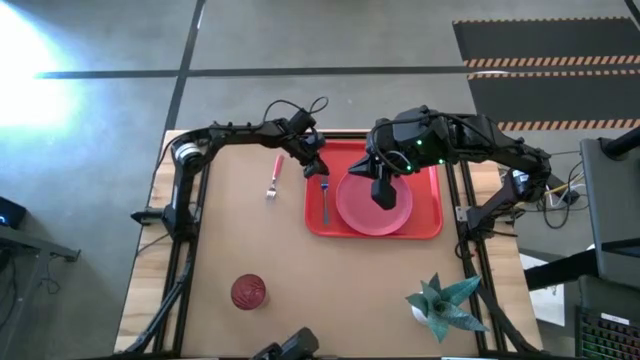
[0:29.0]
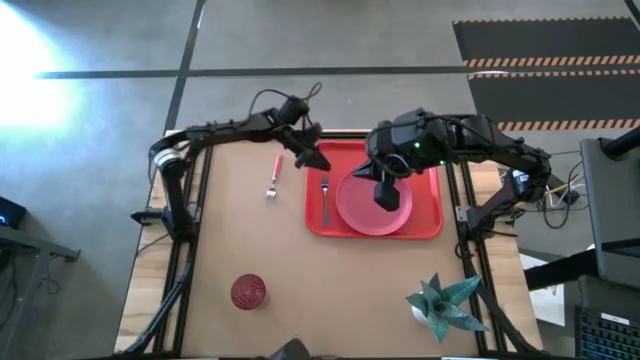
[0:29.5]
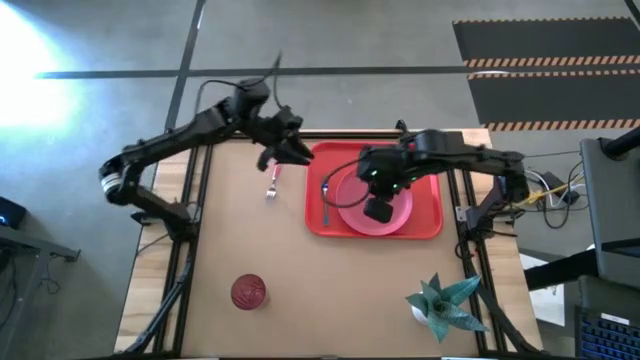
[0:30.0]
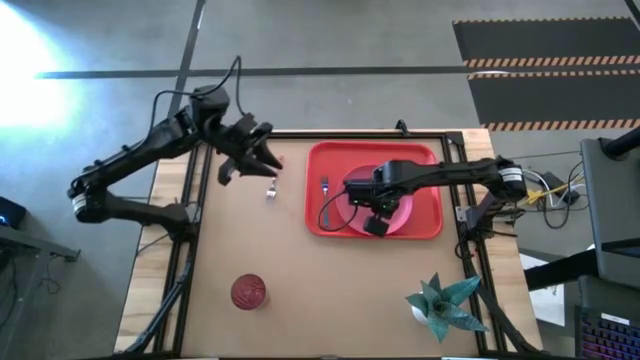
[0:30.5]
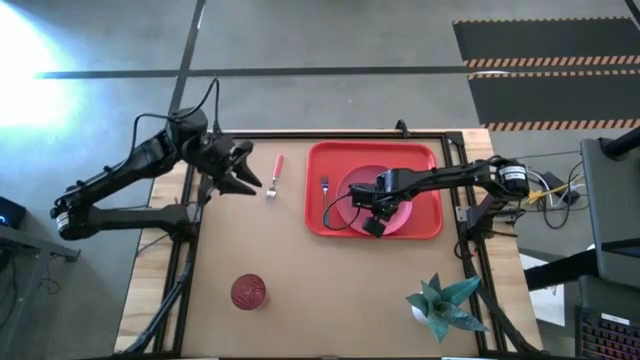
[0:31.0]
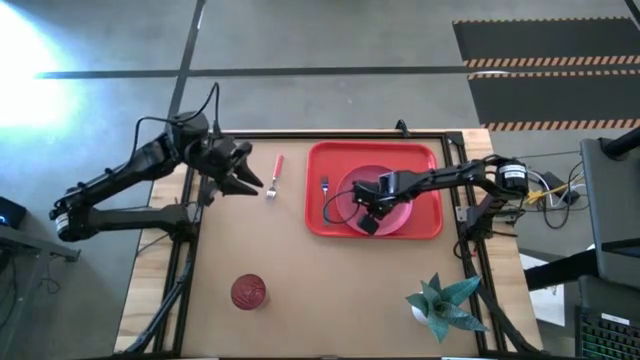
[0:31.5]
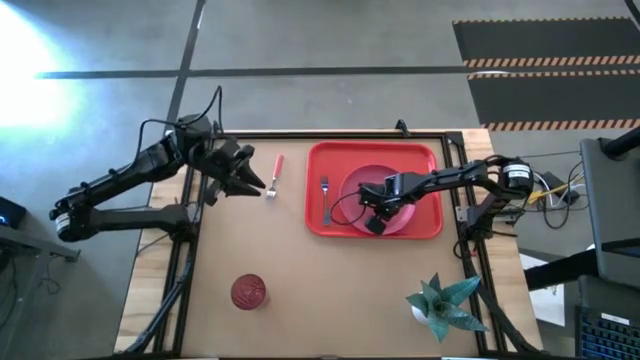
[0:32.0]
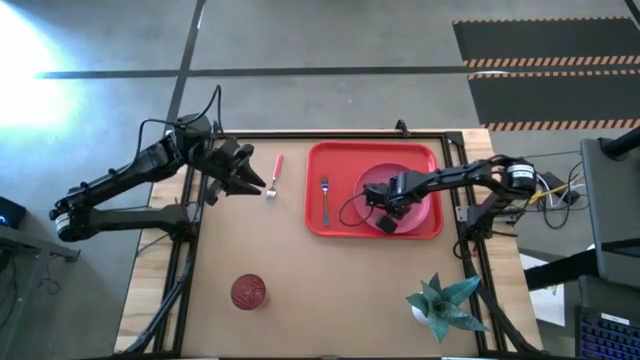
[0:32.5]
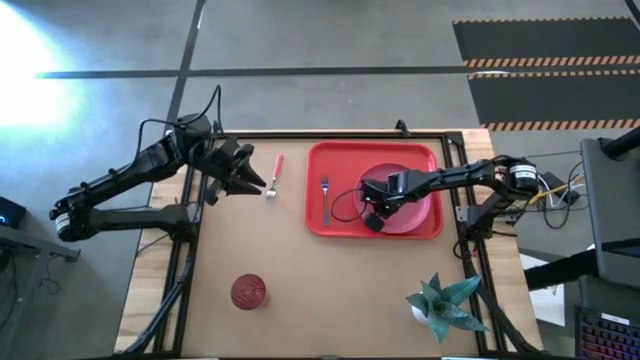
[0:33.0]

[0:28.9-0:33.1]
Task: Pick and place plate/cup/fork/spoon on tray
Adjust the pink plate on the red tray

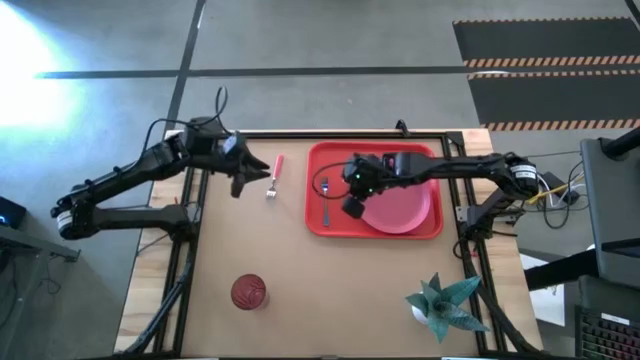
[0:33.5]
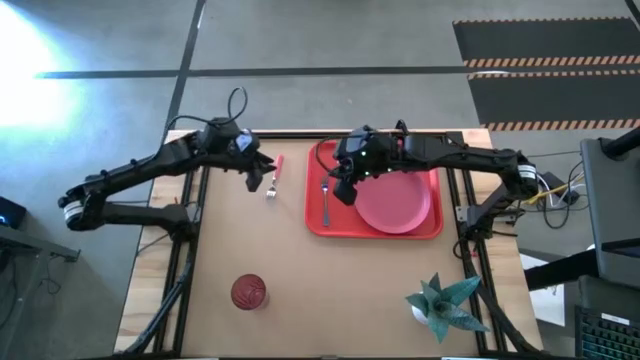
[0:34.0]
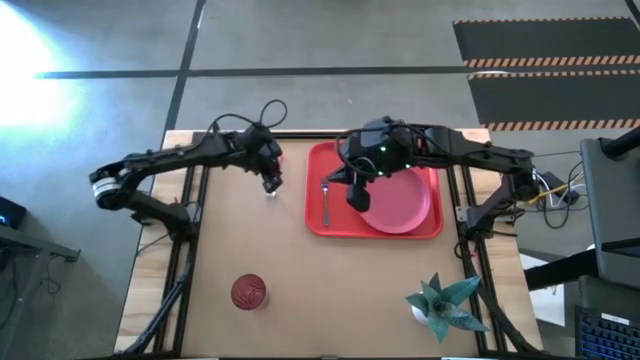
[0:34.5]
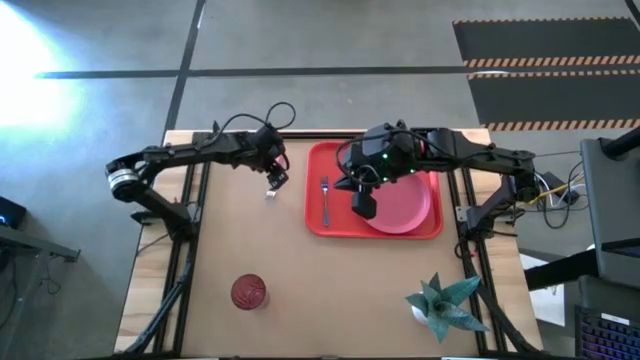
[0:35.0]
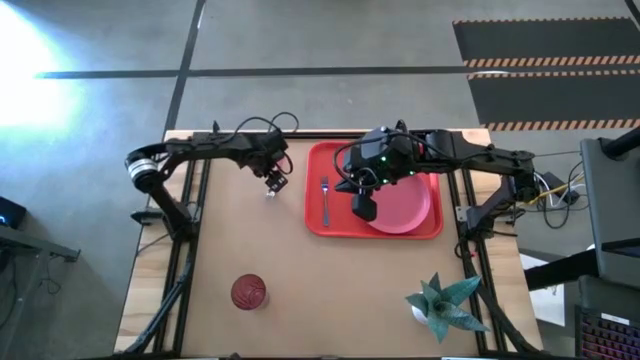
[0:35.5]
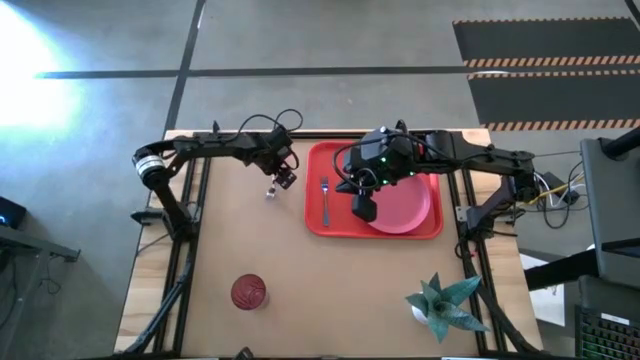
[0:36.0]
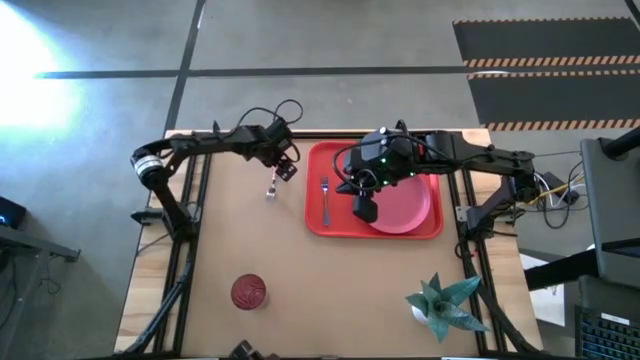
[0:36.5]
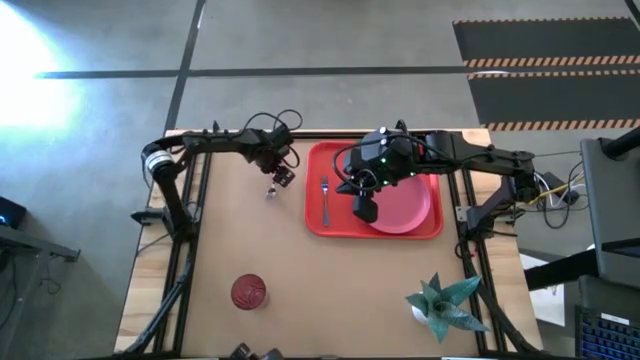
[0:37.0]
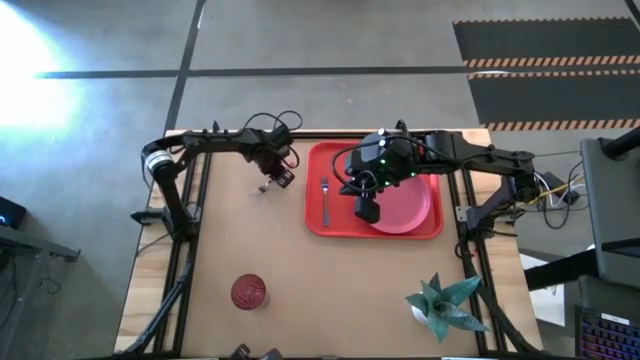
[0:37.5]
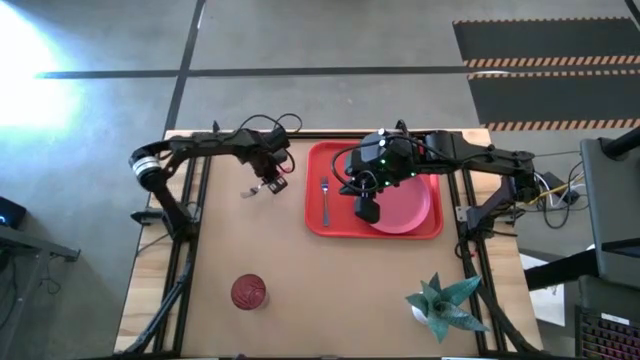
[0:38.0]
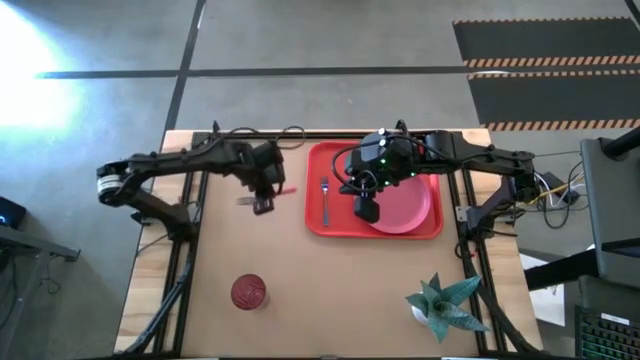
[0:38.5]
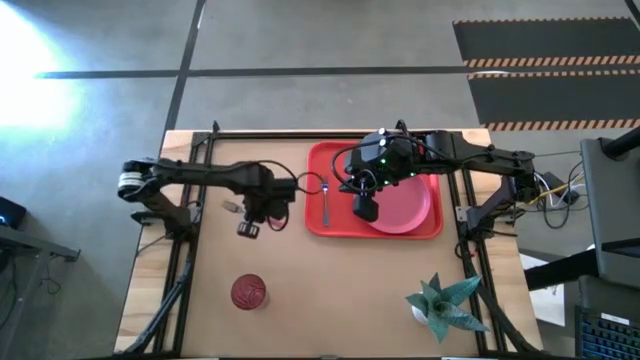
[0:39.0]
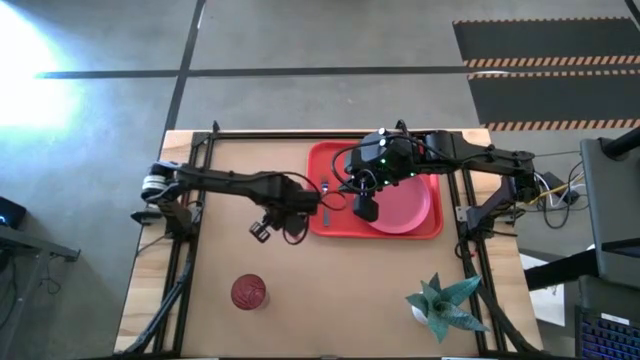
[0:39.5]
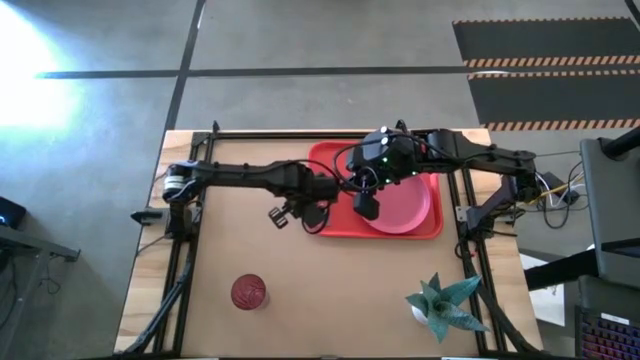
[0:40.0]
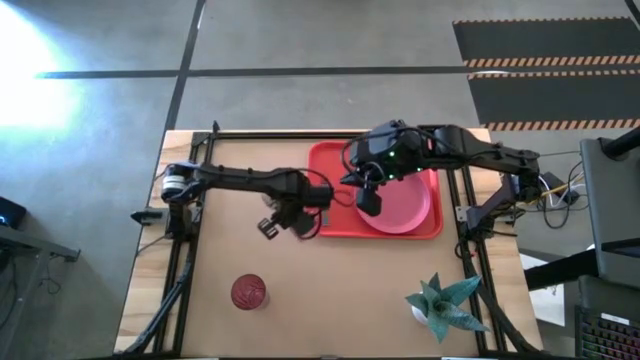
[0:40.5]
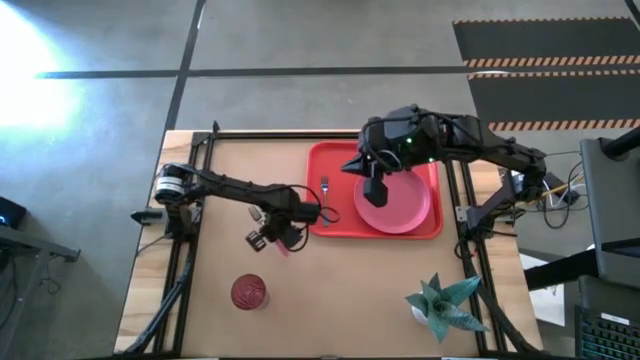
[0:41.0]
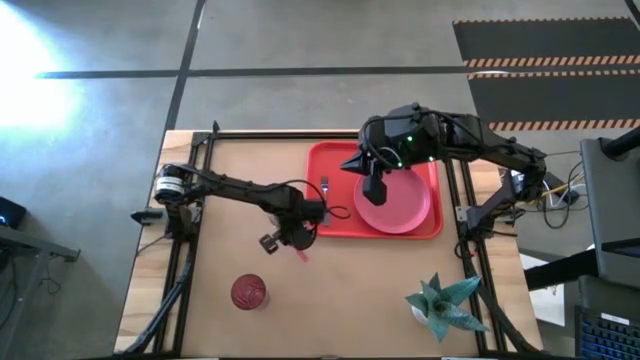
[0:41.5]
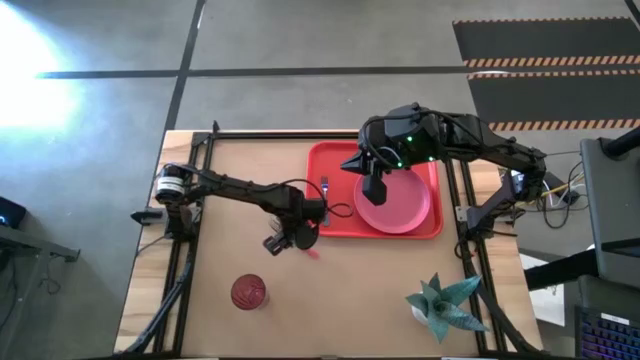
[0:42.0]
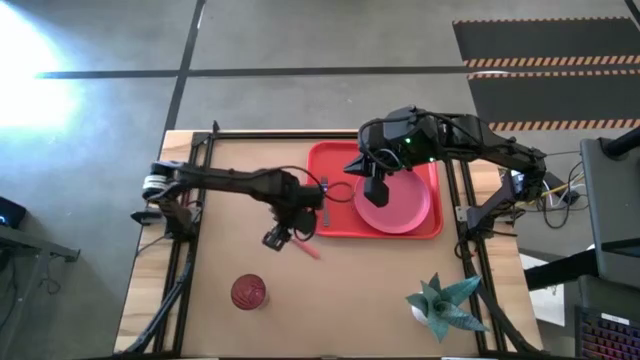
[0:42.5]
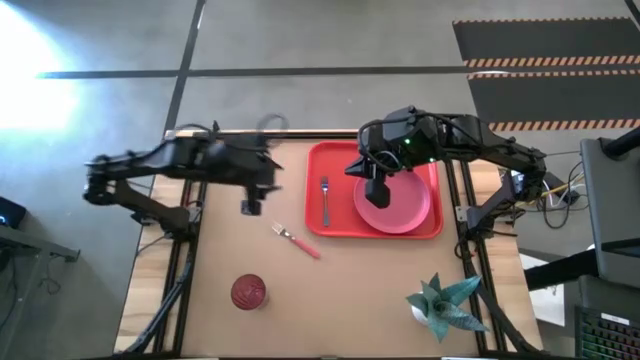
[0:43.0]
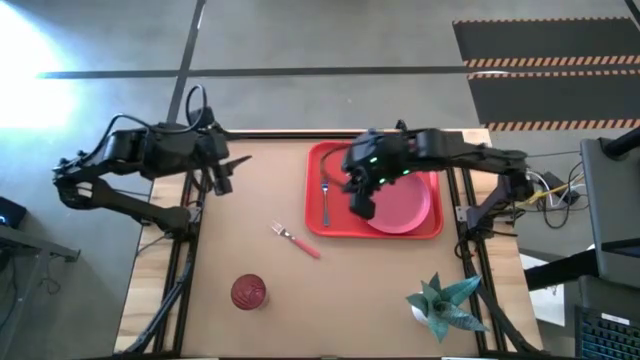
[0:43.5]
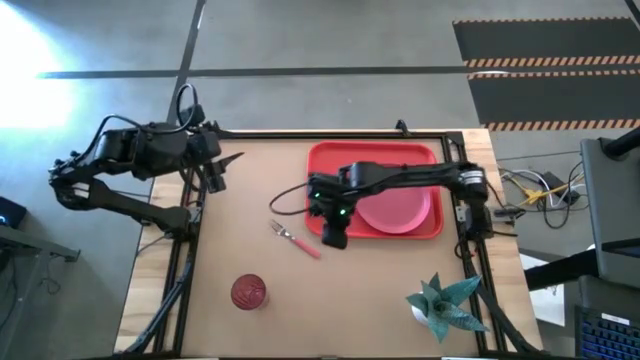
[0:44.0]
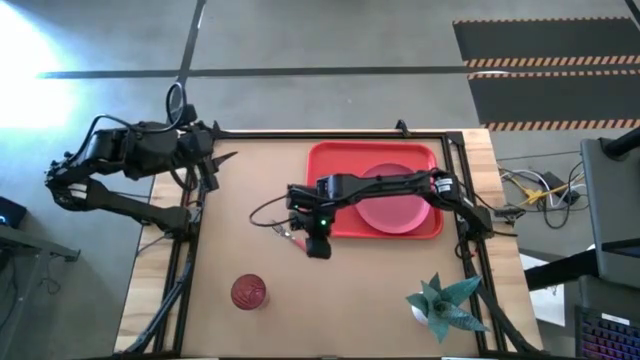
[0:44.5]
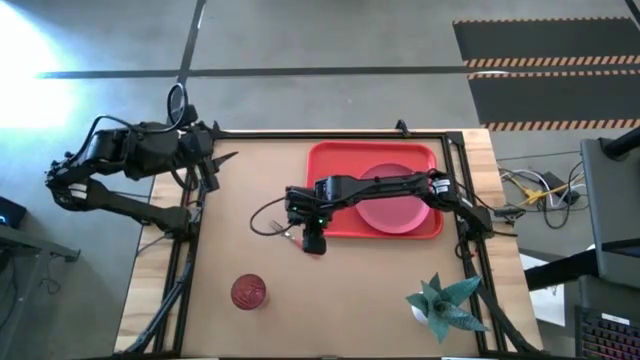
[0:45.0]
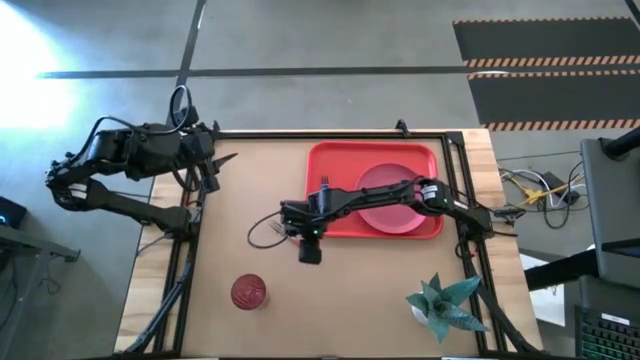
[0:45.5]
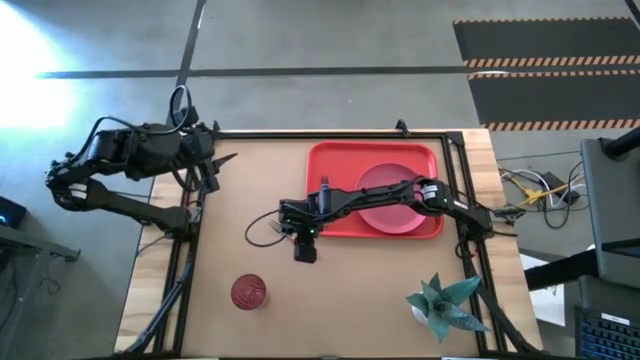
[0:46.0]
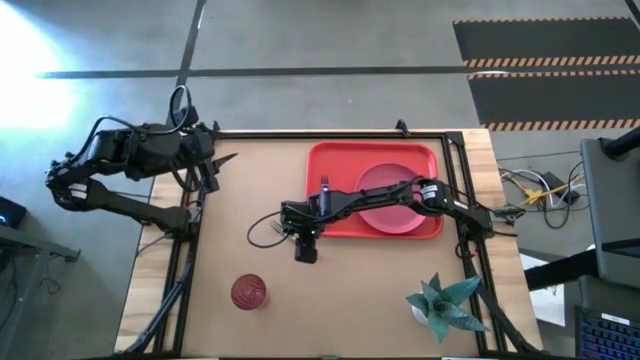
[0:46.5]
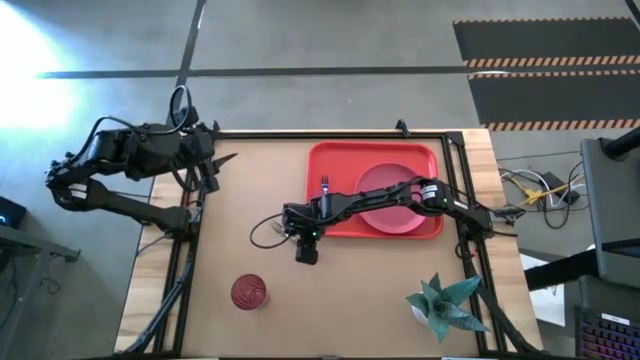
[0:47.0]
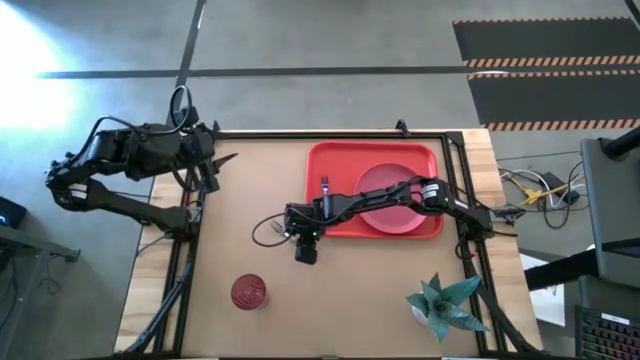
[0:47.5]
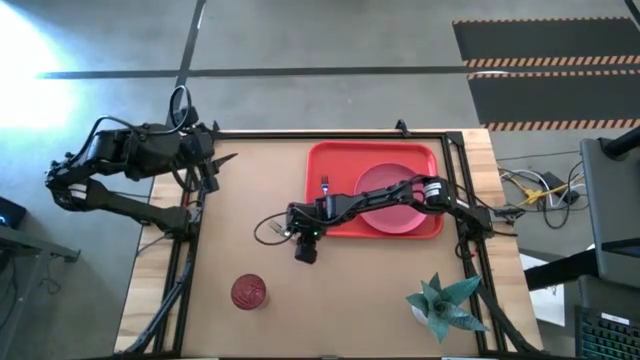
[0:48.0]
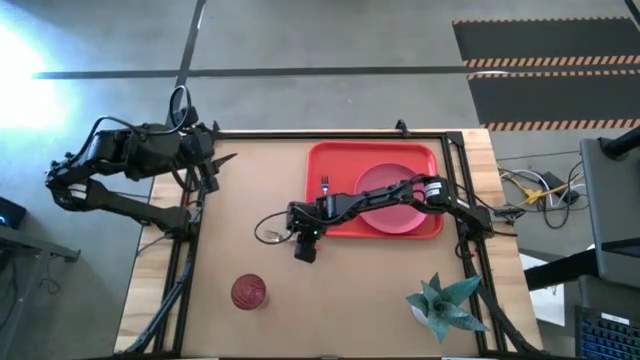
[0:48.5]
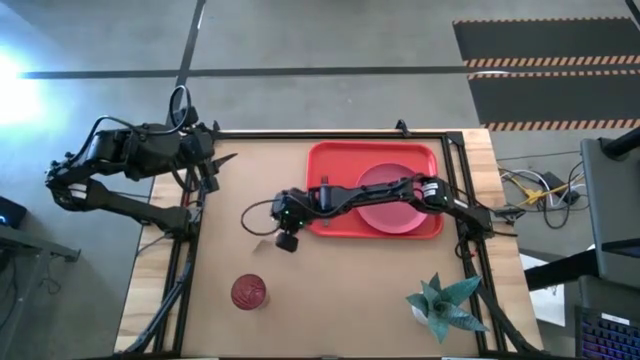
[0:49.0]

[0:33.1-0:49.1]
Put the pink fork on the red tray to the right of the pink plate
